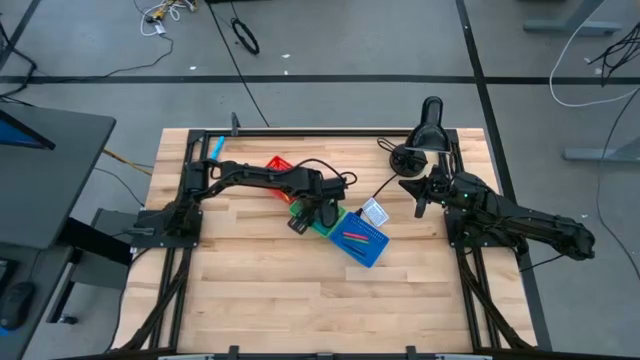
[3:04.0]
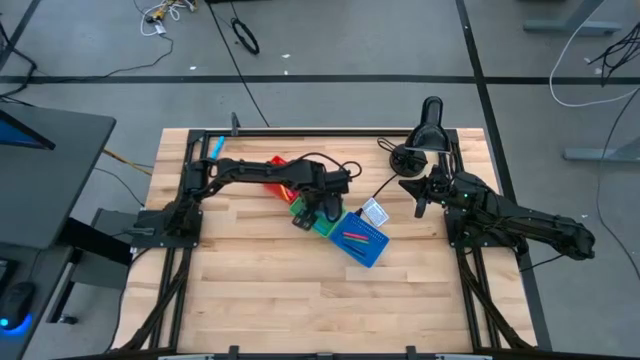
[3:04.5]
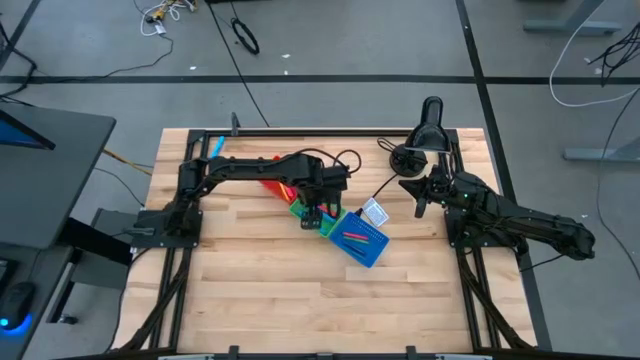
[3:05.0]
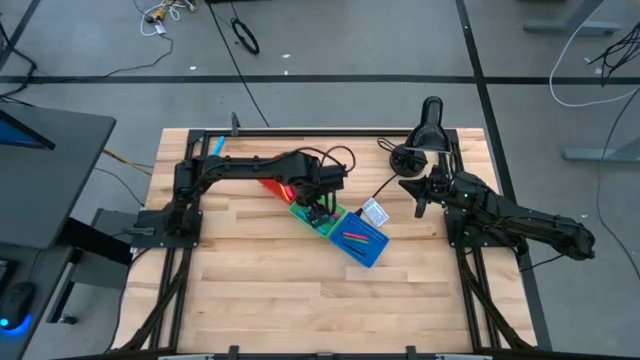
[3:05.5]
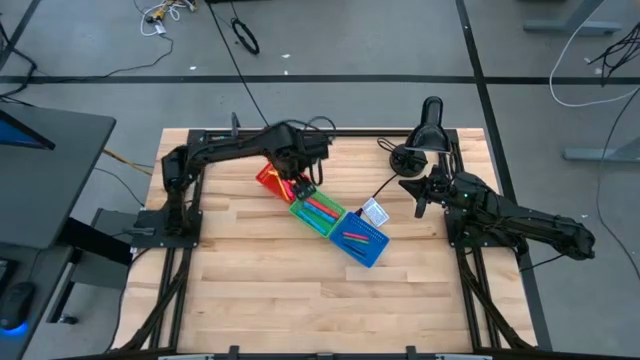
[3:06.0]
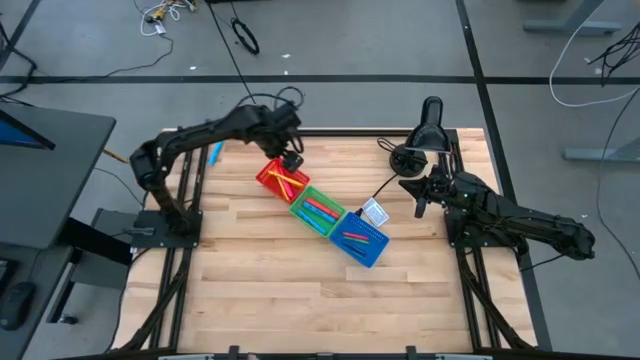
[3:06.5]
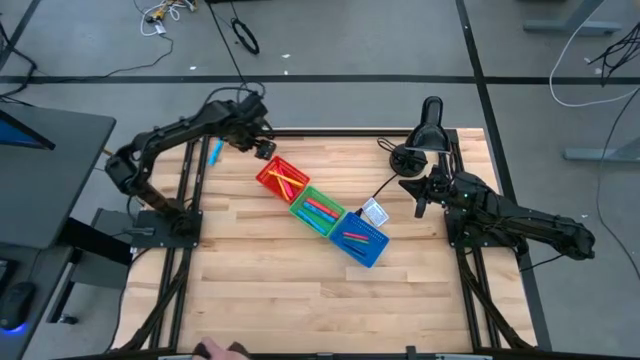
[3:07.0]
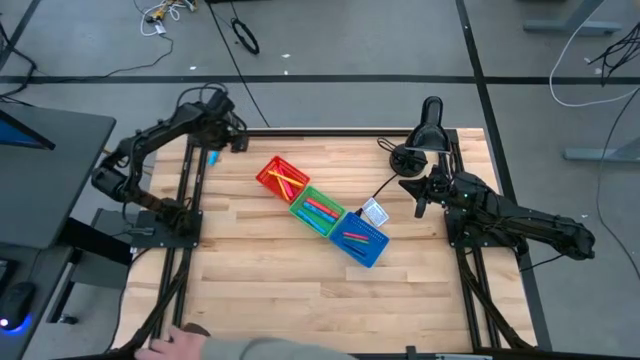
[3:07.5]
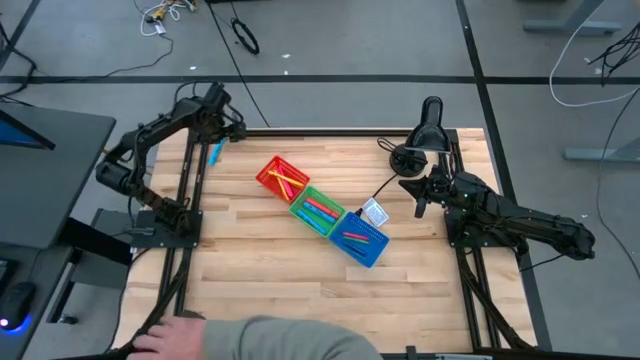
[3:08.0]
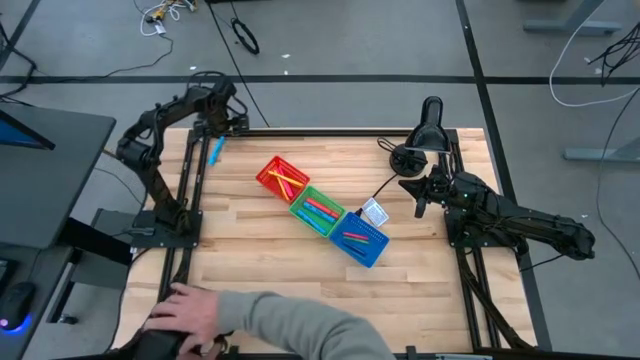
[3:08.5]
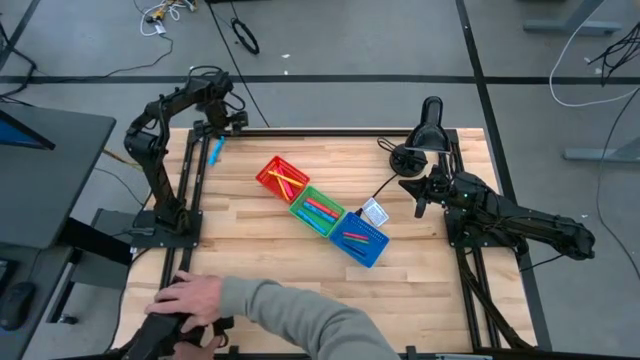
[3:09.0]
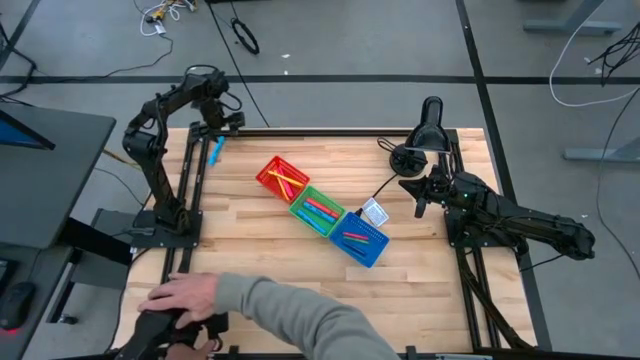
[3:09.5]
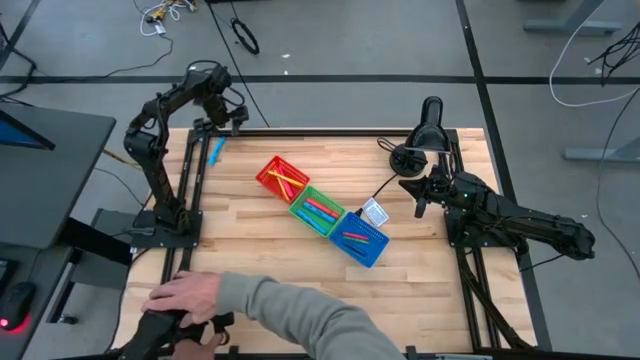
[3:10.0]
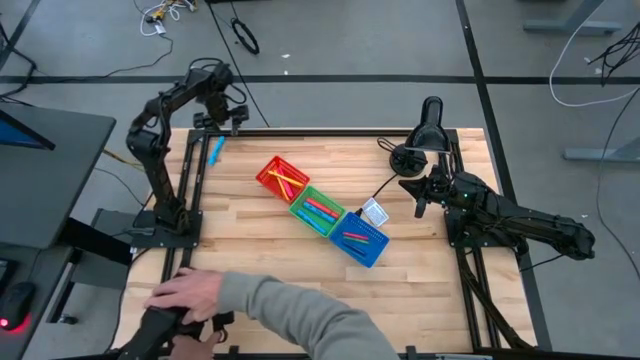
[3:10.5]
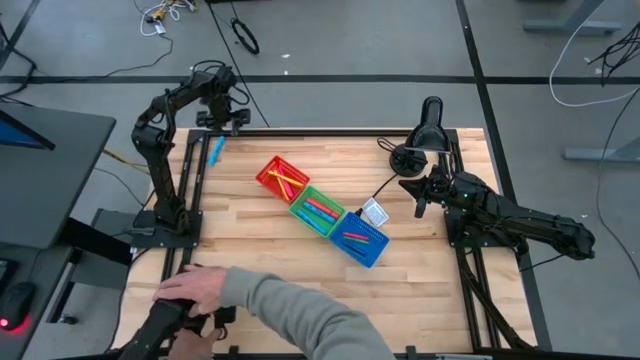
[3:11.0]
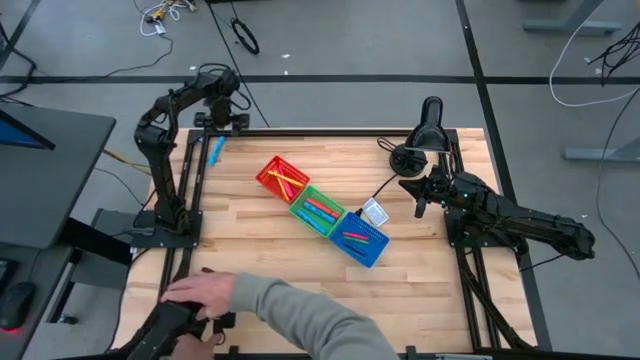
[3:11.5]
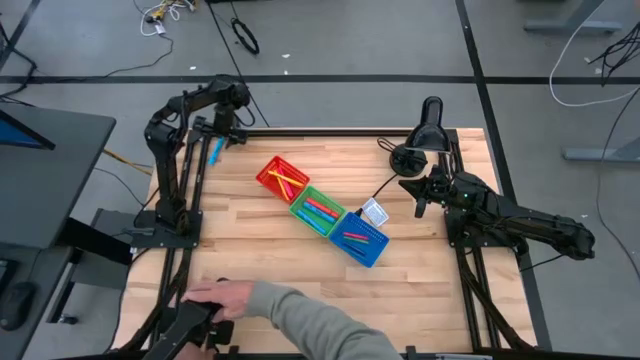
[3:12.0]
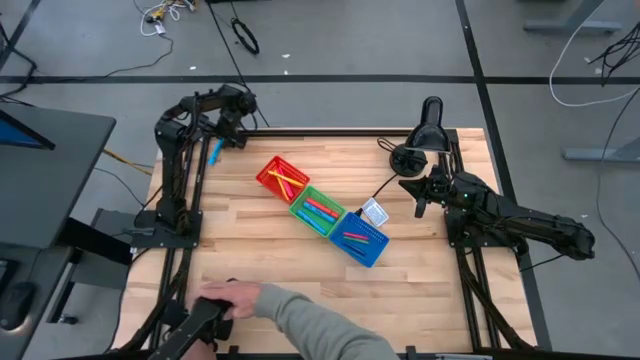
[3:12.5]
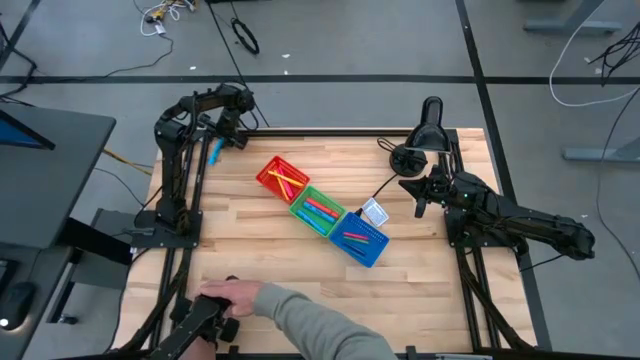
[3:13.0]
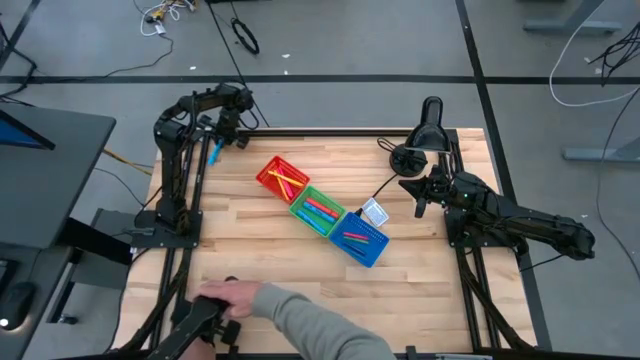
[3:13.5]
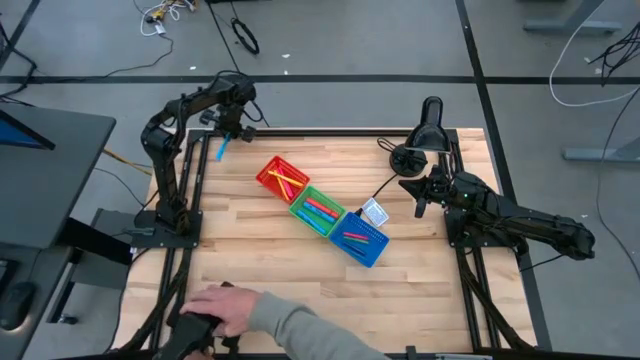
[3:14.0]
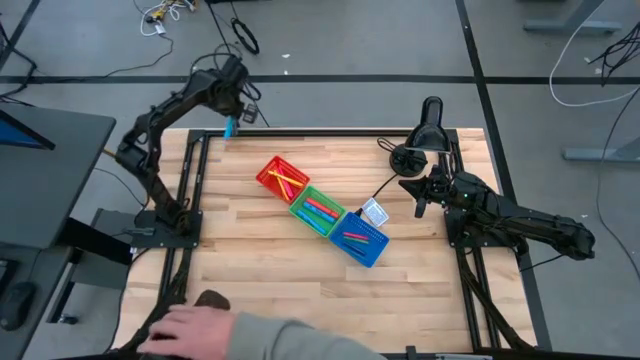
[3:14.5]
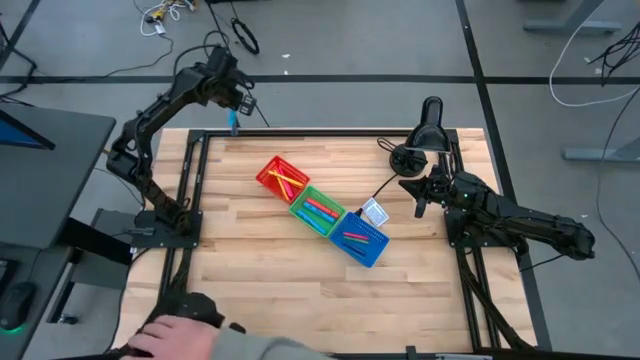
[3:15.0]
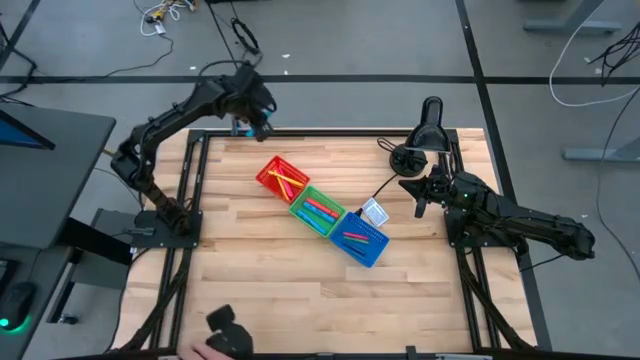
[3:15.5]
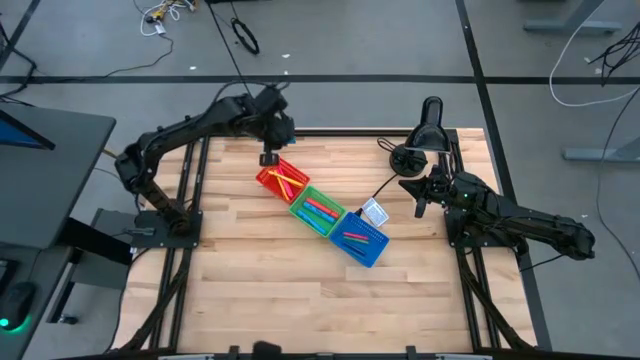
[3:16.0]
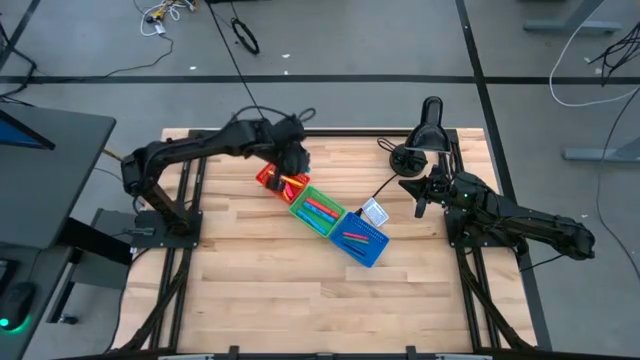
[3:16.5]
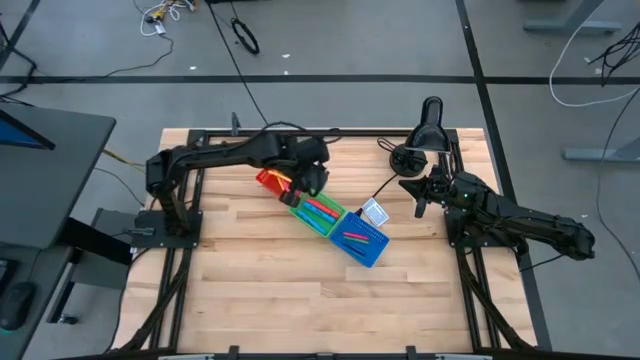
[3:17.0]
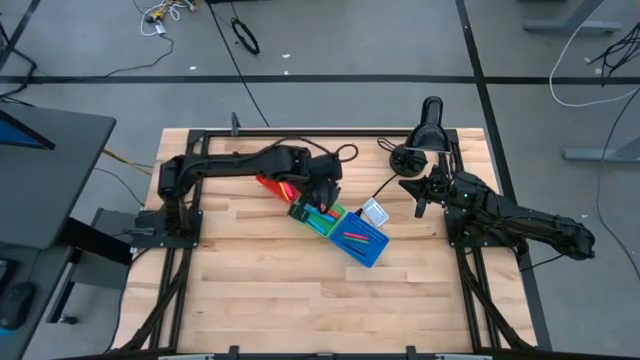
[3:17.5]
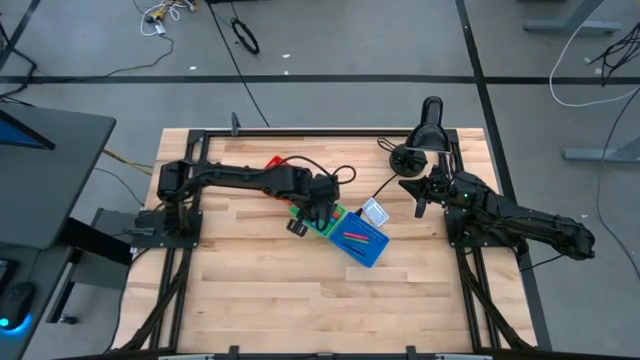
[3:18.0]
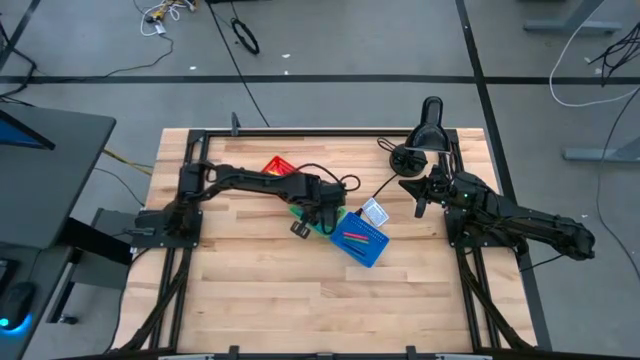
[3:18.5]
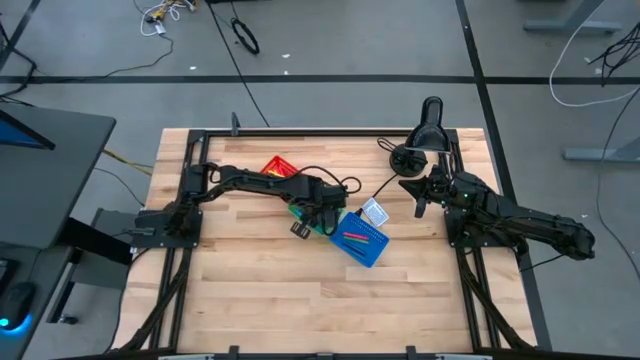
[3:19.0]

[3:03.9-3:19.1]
Task: Pick & Place Markers
Put the light blue highlighter pen into the green bin

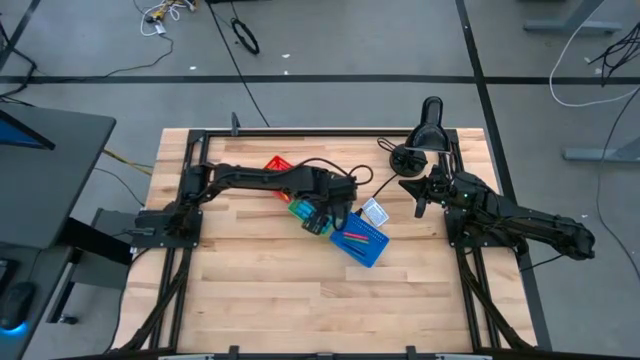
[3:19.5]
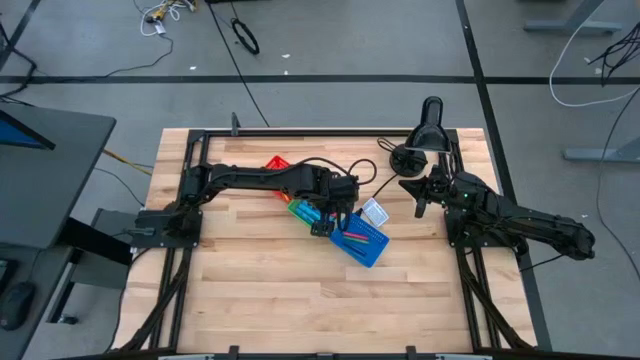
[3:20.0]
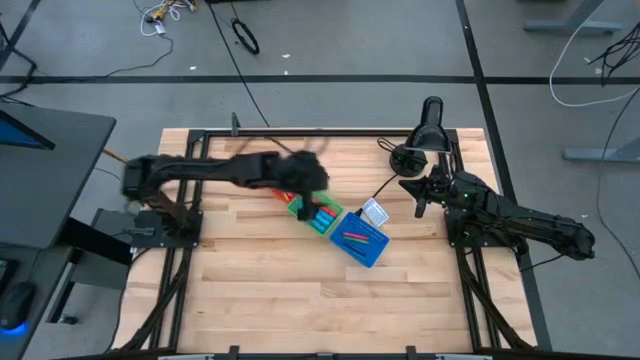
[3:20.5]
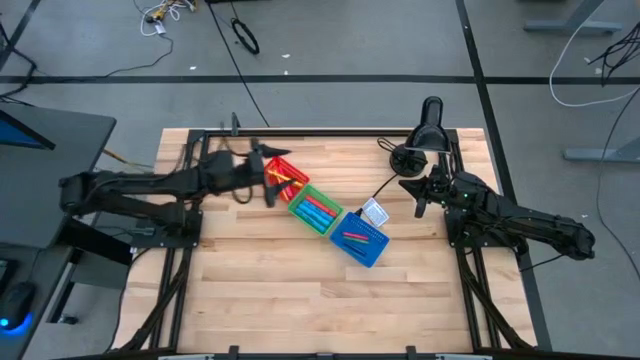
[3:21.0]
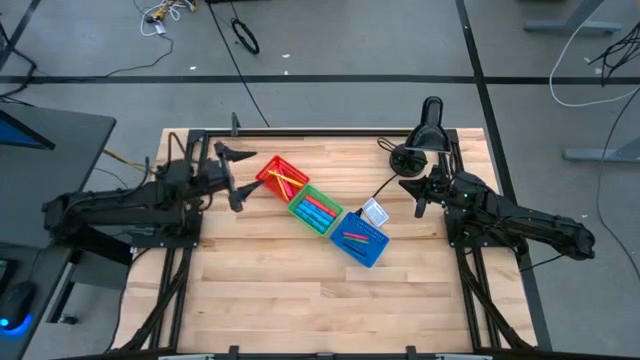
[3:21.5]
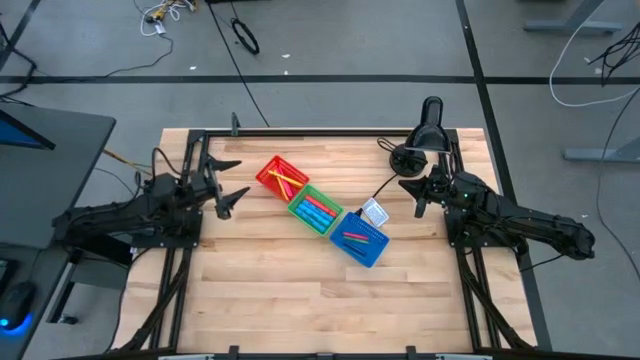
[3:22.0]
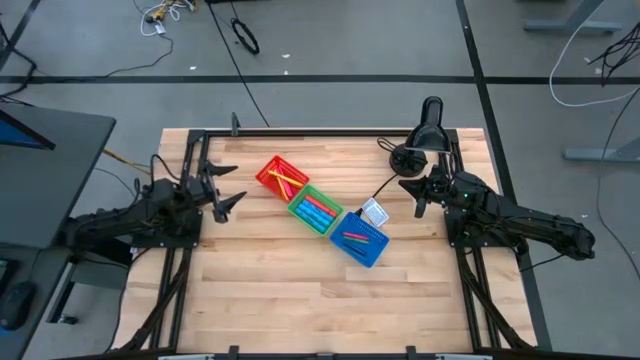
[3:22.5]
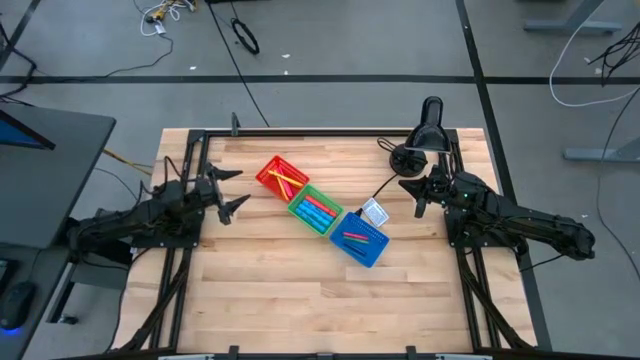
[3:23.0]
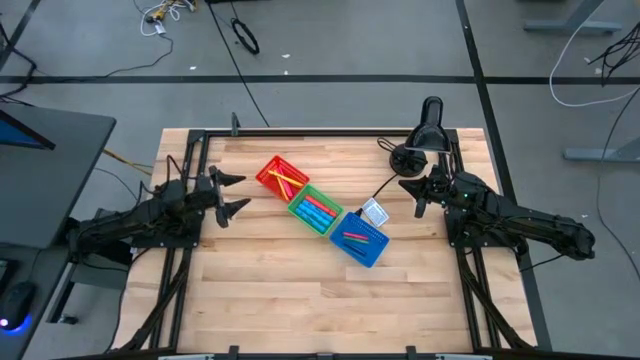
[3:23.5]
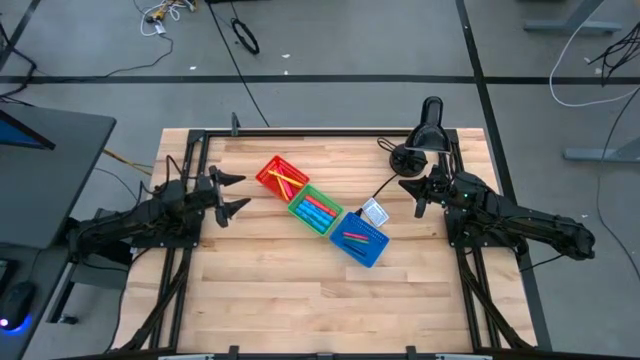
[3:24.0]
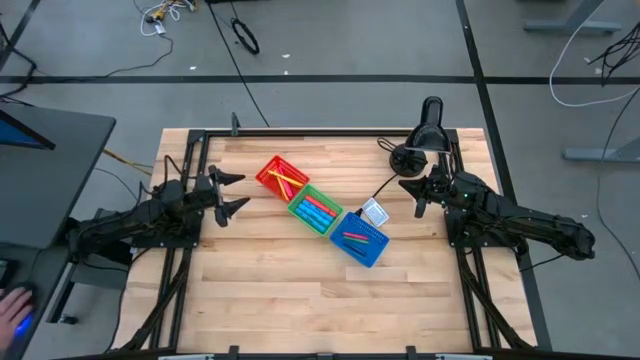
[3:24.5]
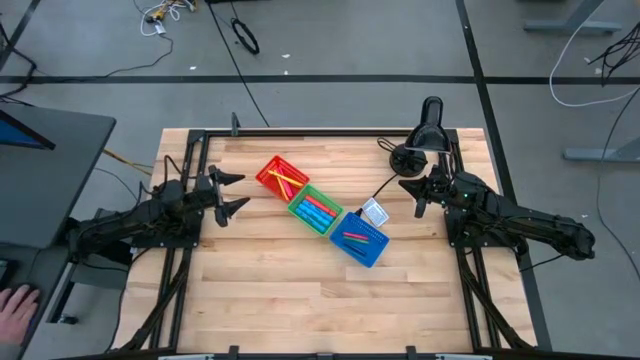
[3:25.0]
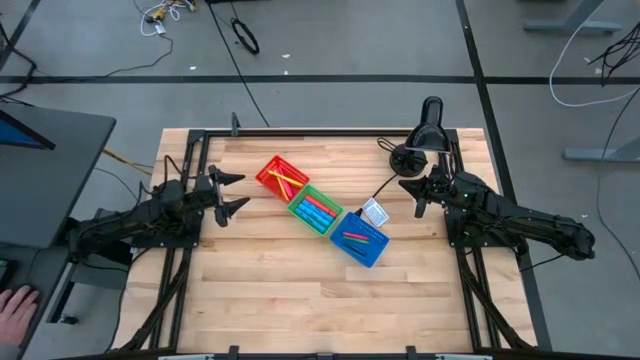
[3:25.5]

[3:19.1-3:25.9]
Return to Home Position
